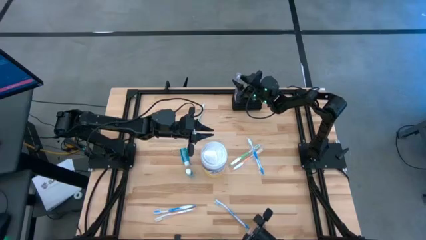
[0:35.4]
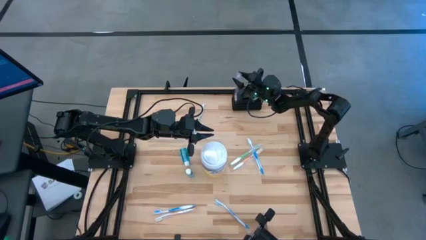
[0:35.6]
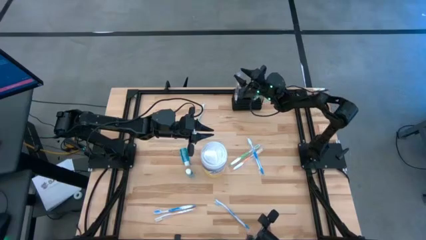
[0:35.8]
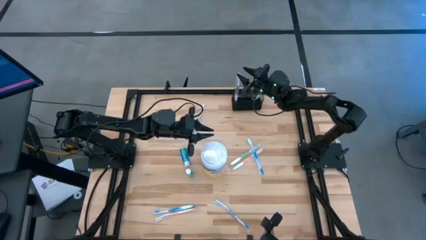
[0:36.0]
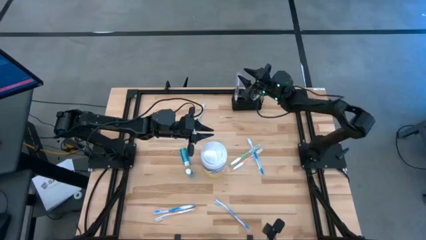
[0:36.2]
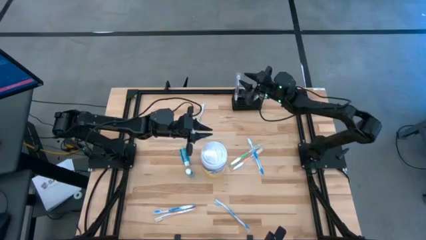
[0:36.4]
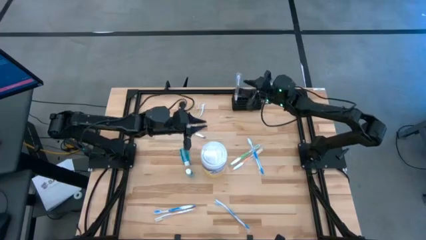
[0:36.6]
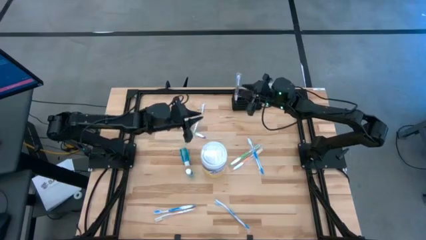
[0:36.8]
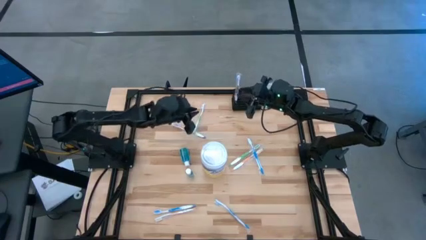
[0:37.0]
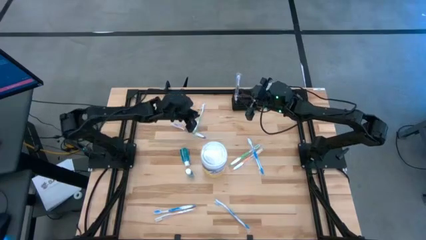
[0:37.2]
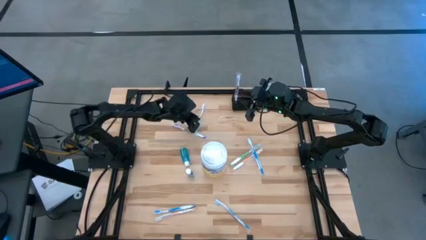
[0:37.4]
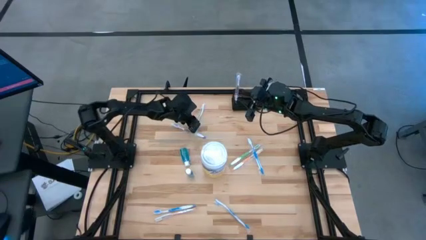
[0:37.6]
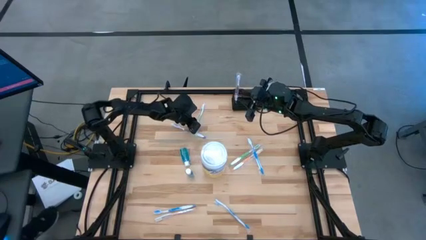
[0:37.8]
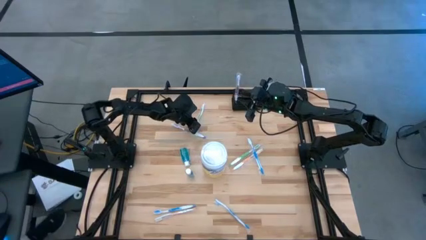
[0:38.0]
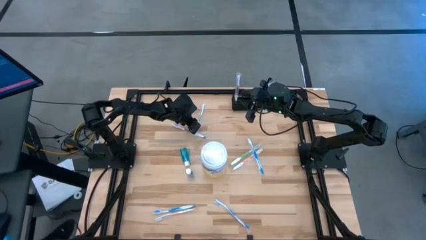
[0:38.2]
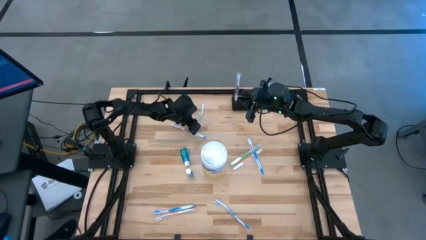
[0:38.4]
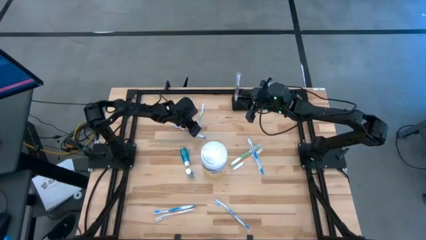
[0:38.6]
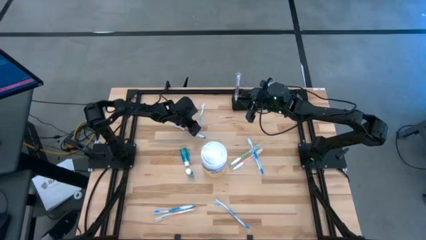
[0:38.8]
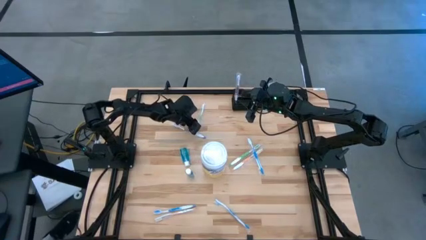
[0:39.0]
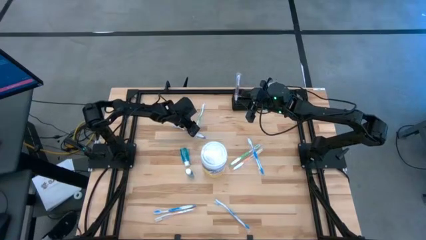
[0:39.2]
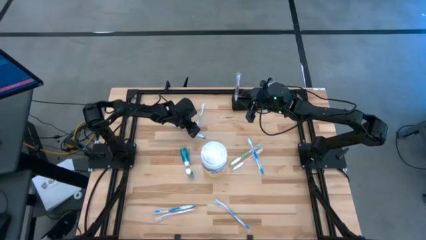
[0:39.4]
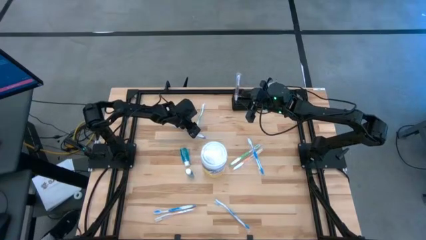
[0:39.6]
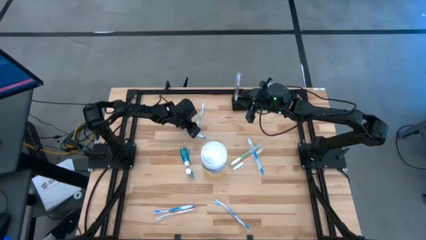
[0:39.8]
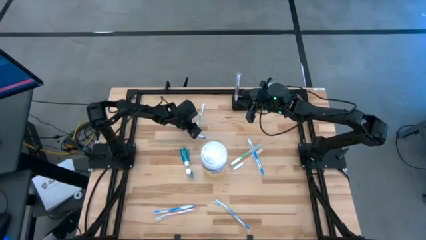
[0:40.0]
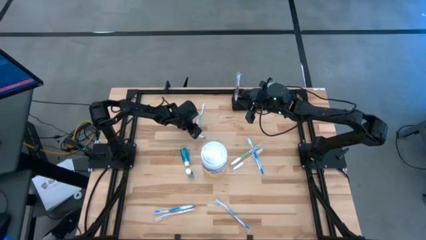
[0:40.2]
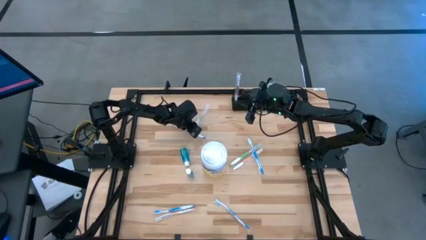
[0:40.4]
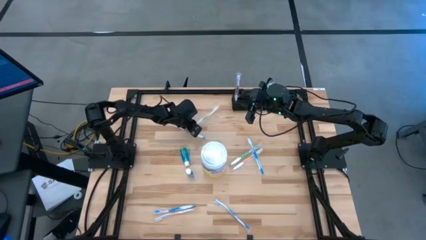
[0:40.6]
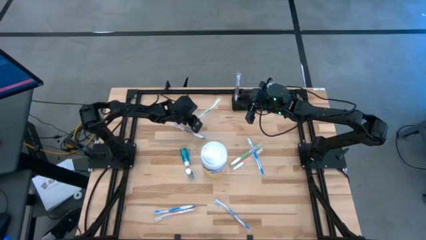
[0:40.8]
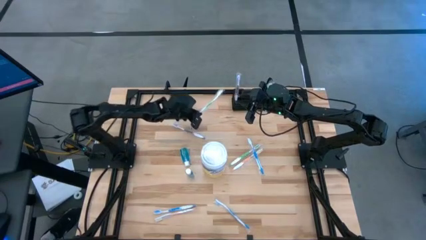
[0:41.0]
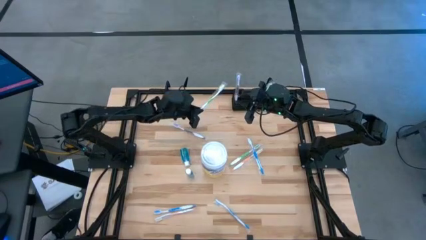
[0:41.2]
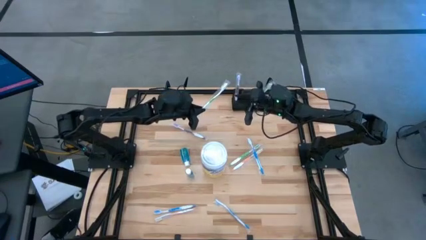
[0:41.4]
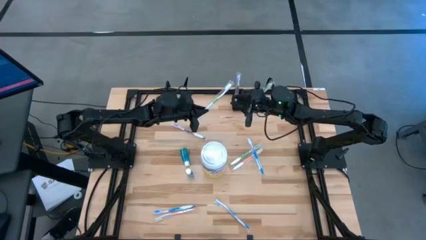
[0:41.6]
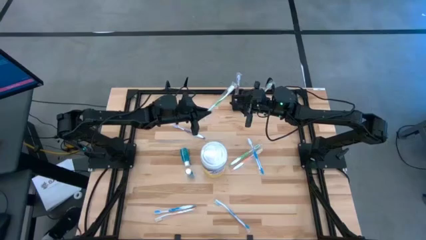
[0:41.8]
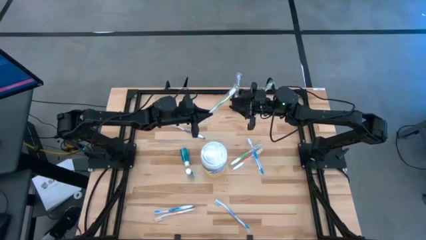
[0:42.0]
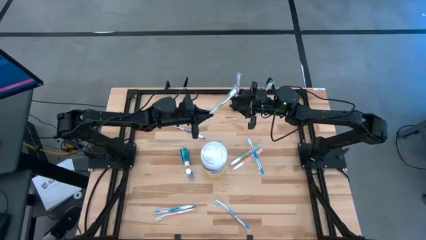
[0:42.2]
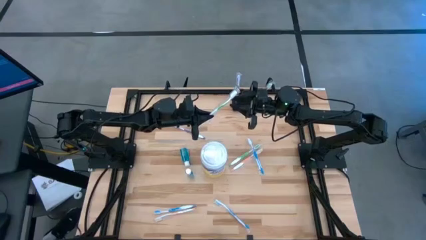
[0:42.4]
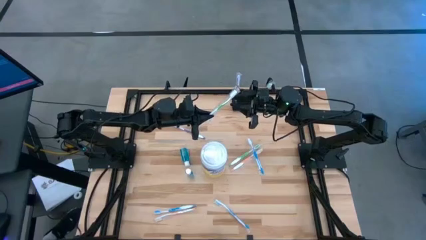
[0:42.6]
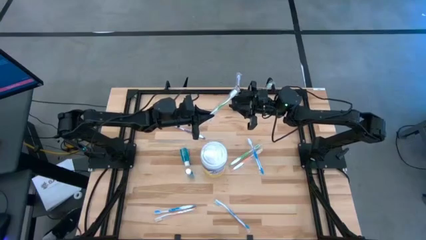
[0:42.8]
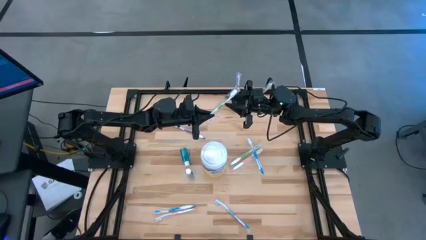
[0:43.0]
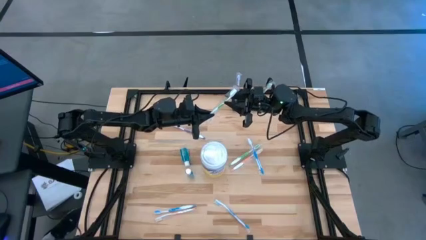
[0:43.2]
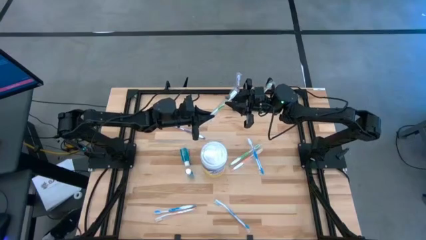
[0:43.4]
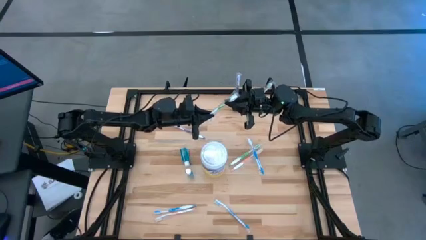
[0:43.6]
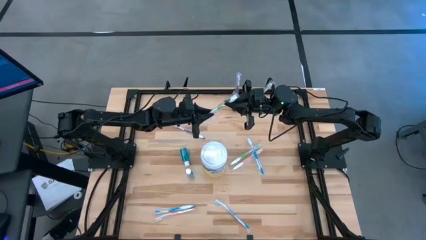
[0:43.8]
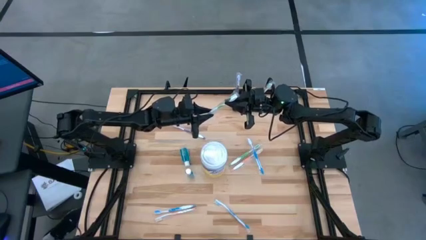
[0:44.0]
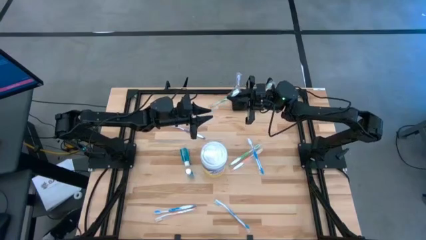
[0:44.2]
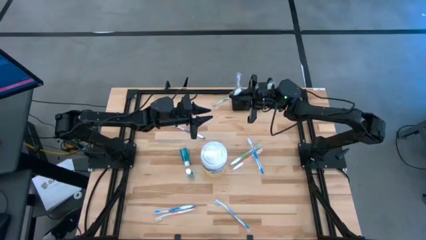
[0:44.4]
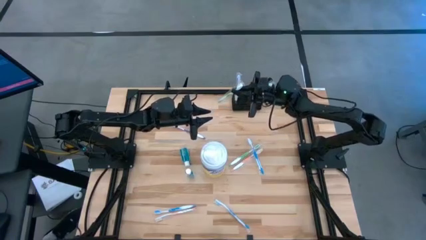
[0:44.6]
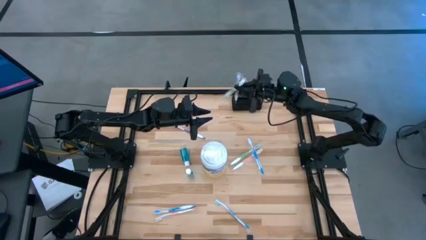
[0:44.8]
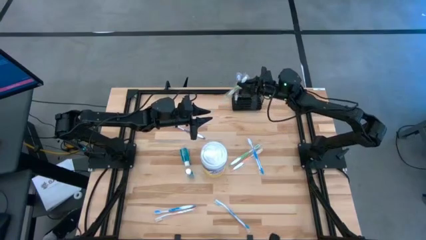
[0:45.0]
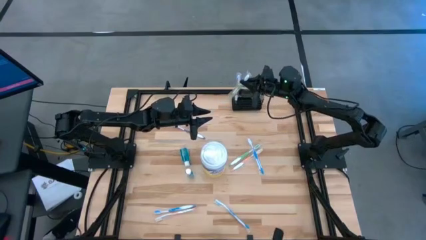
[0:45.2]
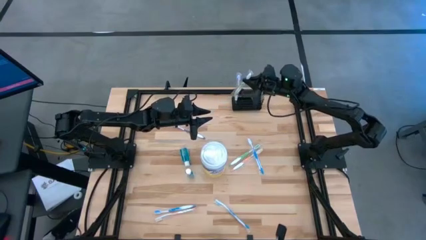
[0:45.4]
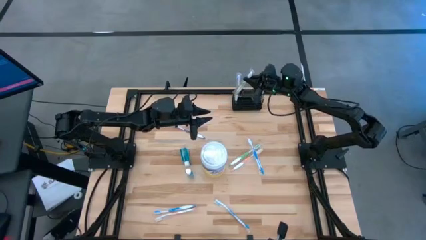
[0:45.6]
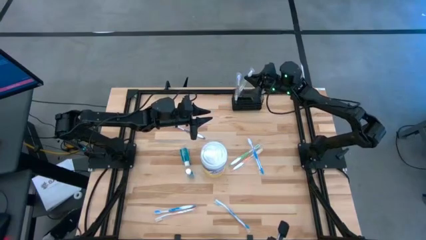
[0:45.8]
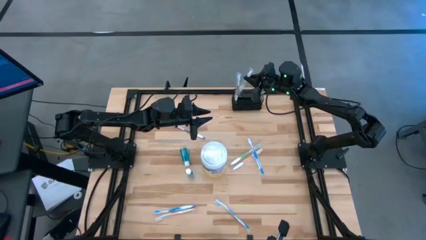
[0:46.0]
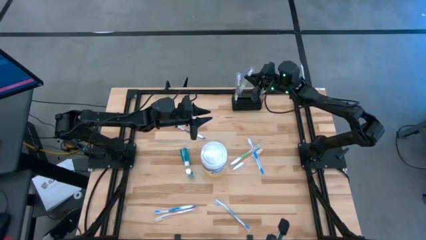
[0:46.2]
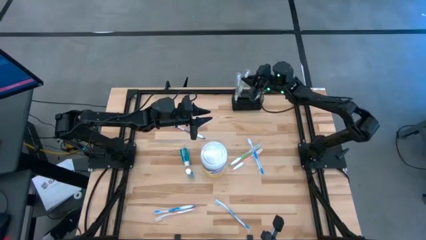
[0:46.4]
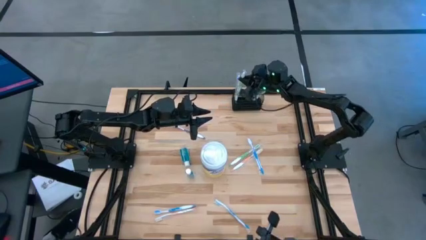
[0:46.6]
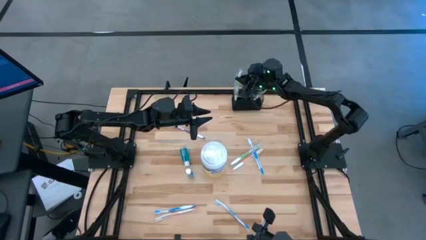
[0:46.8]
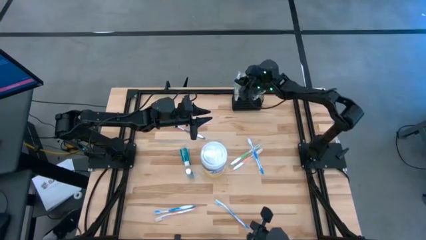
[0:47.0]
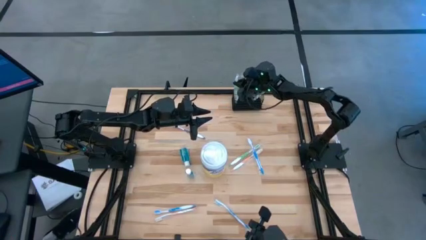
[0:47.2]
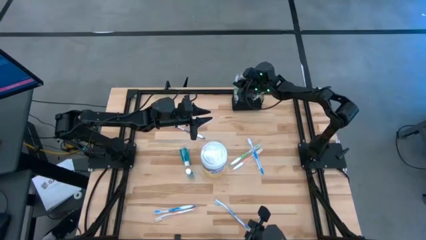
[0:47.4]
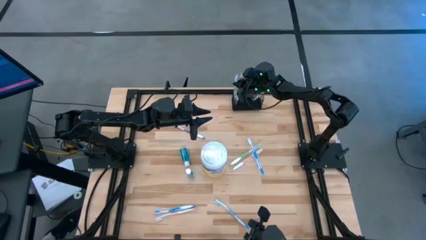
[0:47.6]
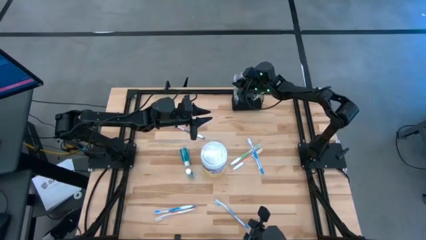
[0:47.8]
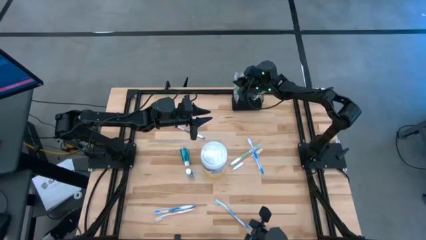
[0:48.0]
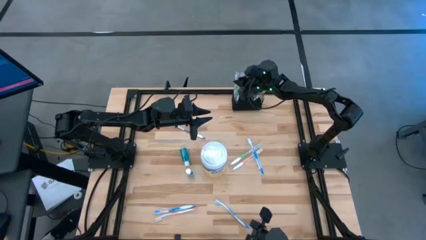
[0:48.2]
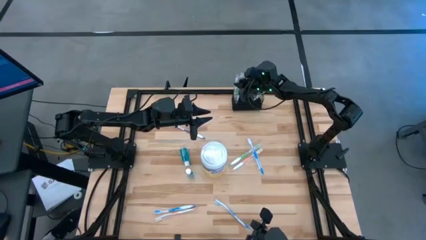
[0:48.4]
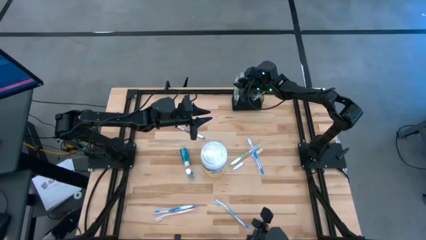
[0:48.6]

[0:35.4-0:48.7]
Task: Pick & Place toothbrushing station
Put the top green toothbrush into the black mesh organizer

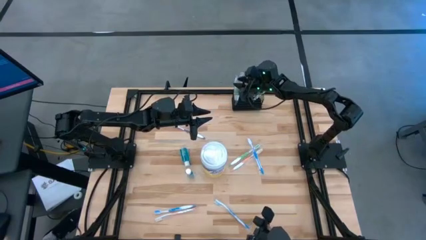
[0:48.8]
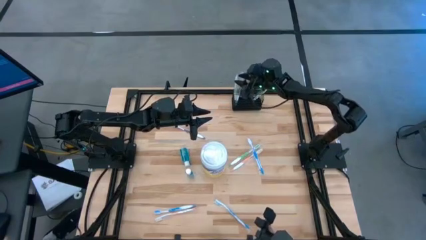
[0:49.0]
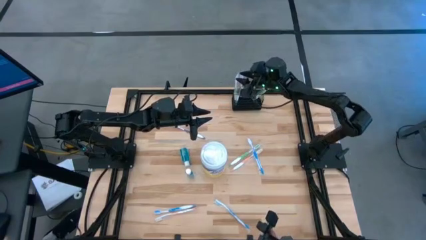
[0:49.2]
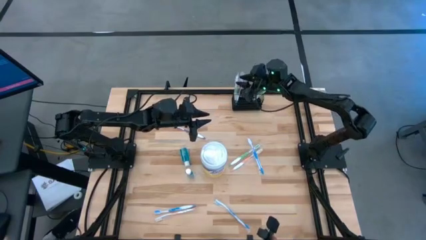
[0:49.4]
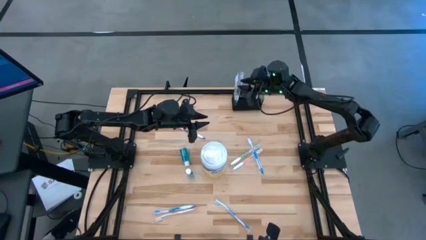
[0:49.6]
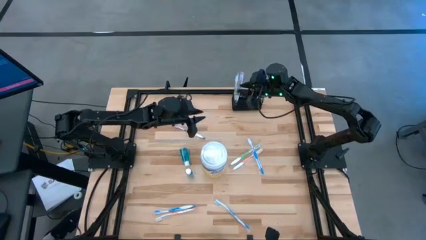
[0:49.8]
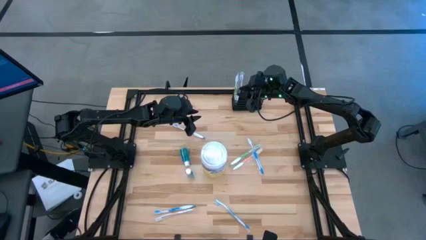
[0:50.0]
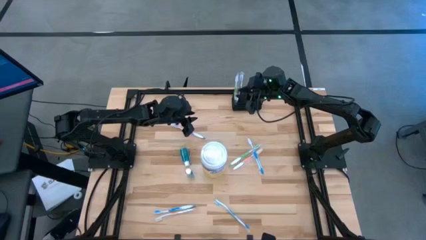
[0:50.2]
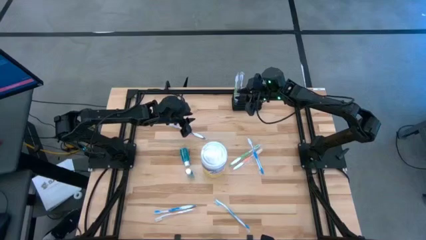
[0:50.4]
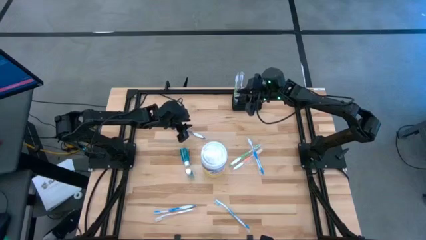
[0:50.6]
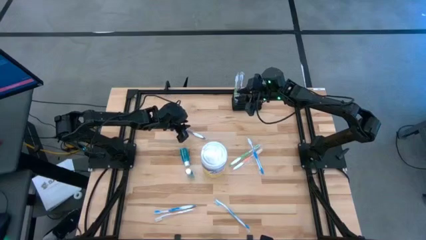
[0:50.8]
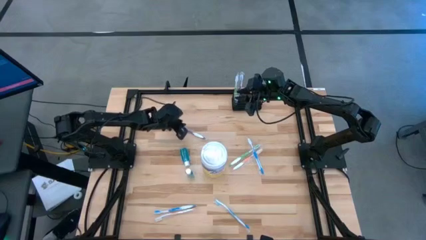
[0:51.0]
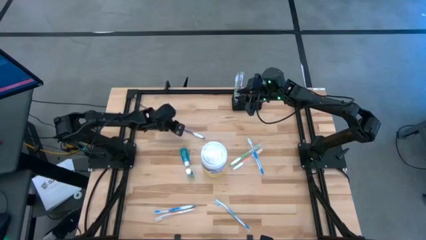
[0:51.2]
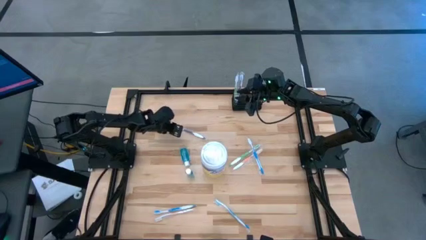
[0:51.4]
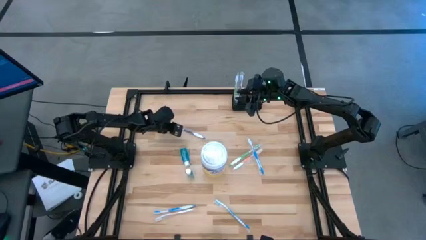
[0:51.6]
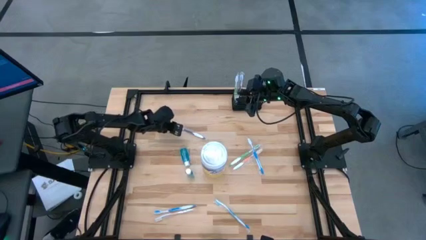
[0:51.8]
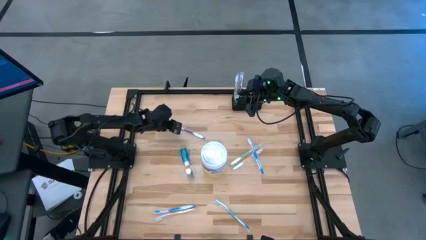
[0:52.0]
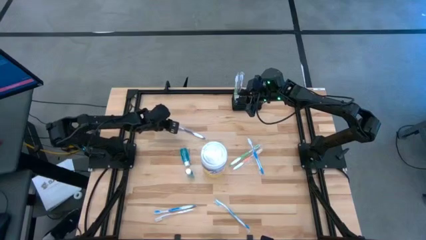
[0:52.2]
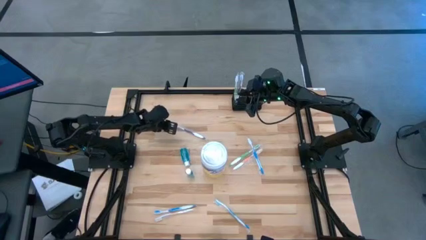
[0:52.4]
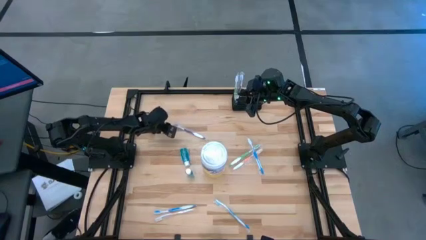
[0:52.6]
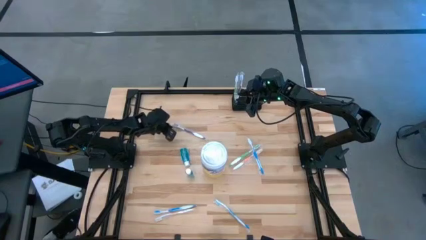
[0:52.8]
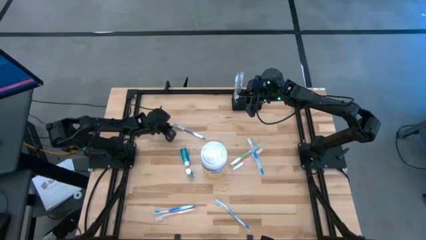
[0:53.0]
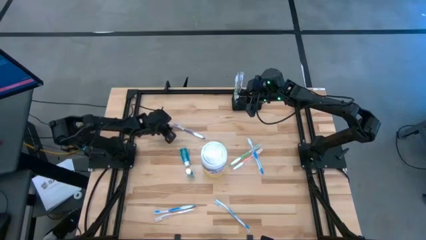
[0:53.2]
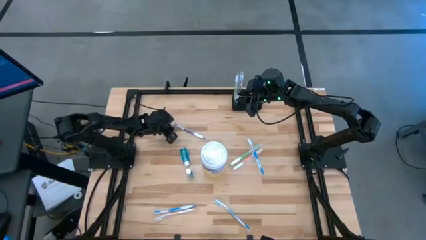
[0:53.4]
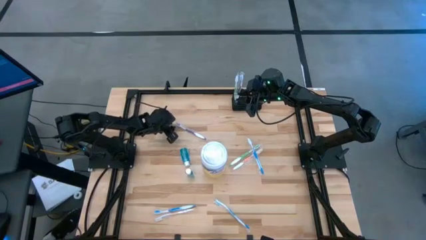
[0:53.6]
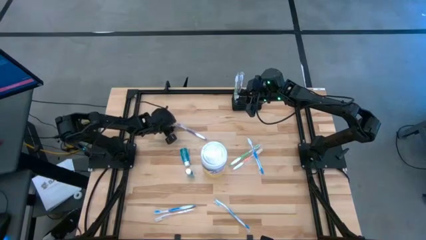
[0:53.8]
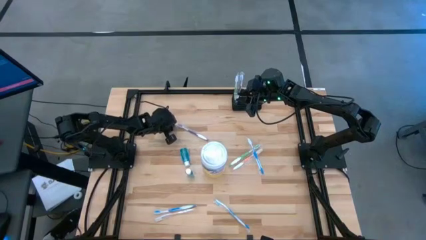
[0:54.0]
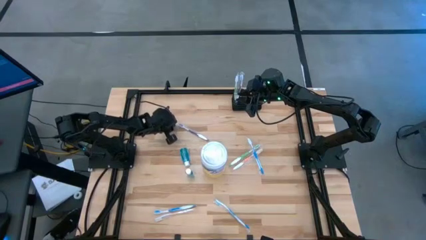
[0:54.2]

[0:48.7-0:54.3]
Put the purple toothbrush into the black mesh organizer
